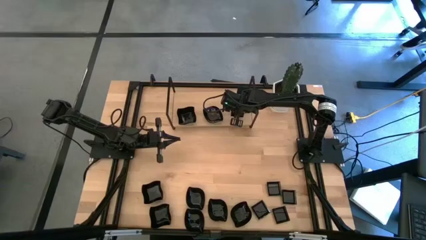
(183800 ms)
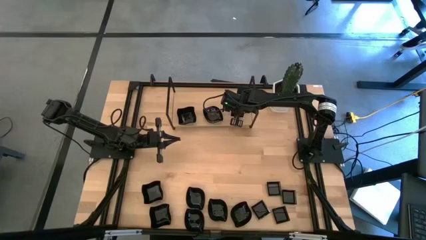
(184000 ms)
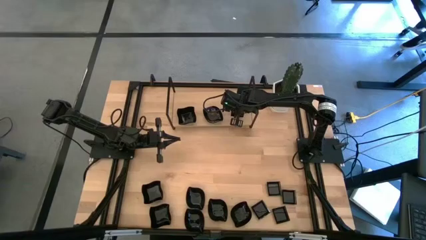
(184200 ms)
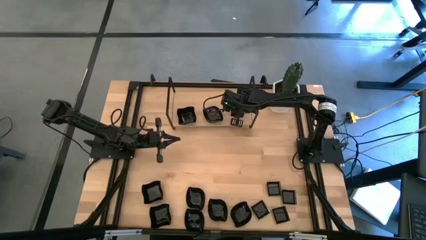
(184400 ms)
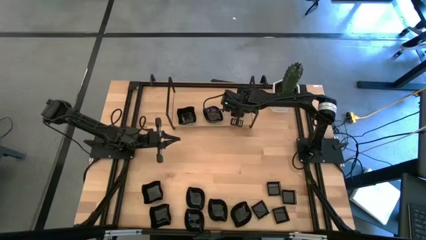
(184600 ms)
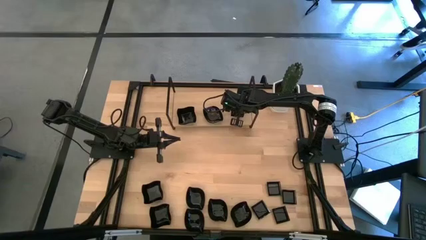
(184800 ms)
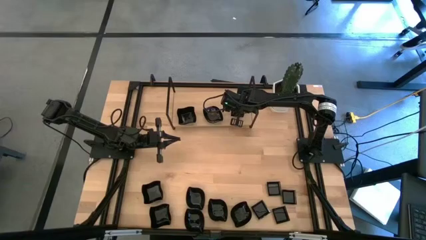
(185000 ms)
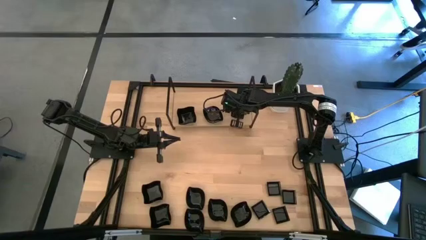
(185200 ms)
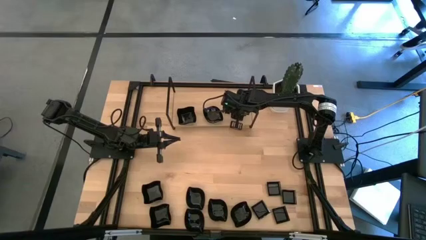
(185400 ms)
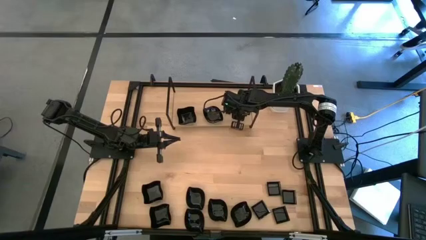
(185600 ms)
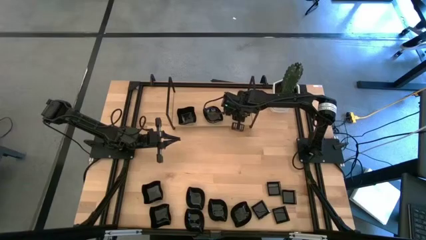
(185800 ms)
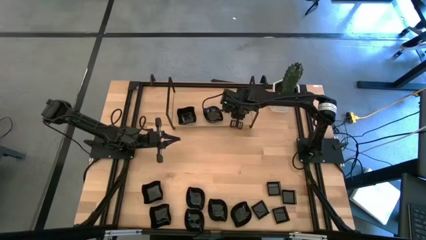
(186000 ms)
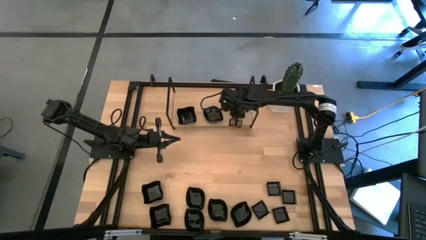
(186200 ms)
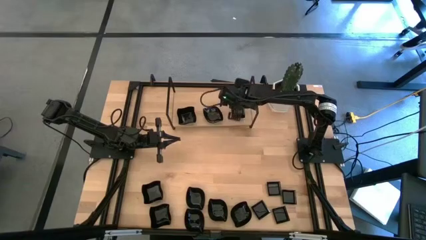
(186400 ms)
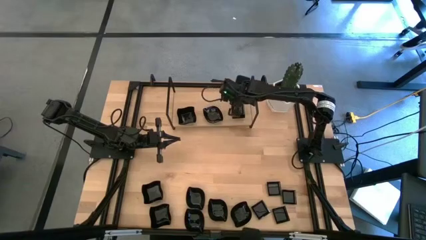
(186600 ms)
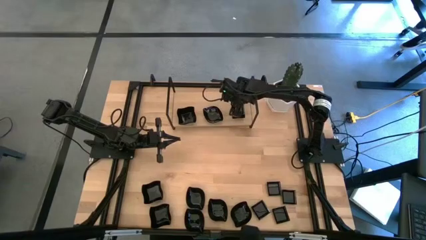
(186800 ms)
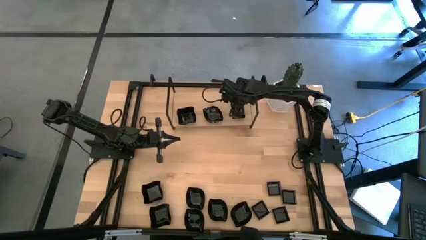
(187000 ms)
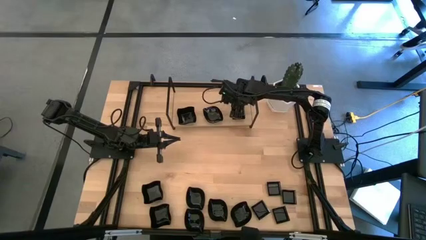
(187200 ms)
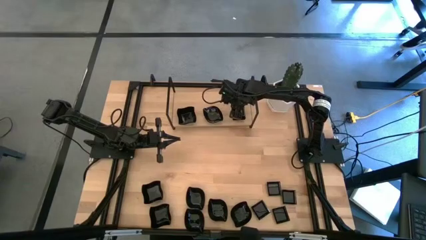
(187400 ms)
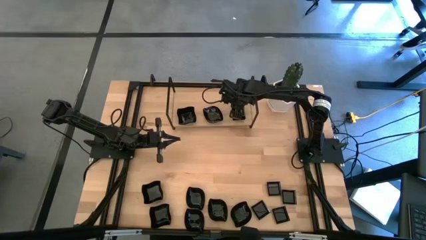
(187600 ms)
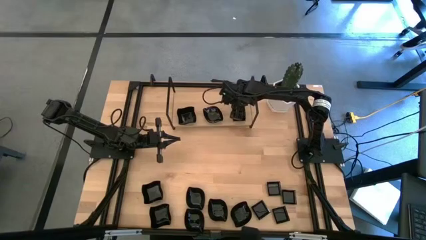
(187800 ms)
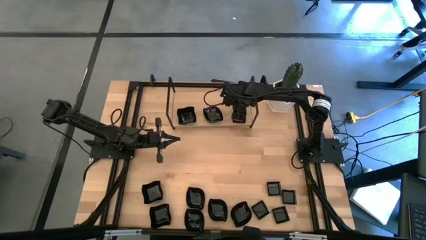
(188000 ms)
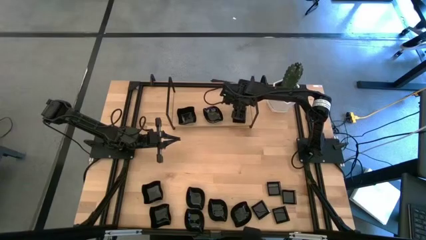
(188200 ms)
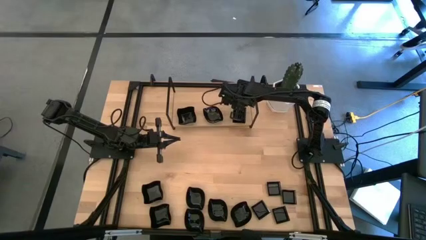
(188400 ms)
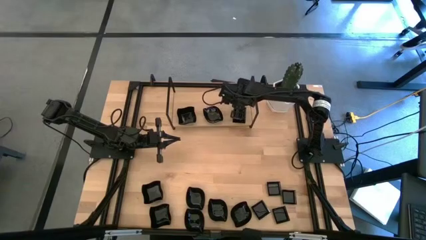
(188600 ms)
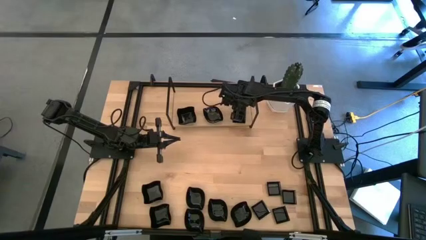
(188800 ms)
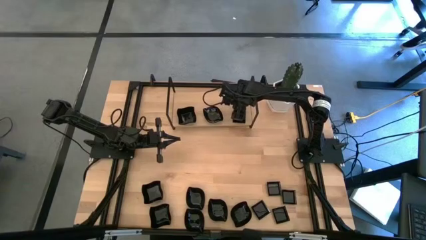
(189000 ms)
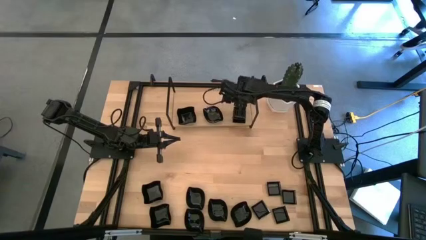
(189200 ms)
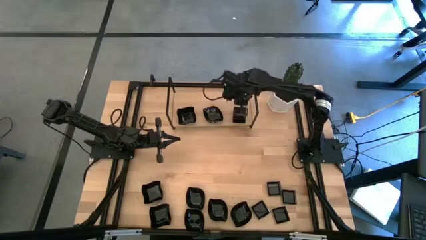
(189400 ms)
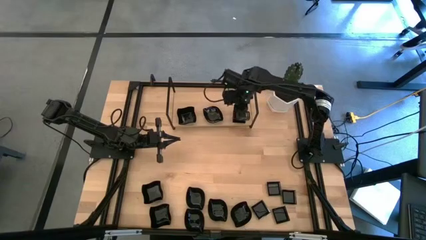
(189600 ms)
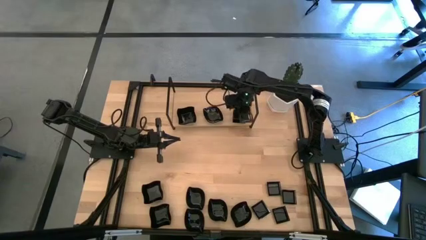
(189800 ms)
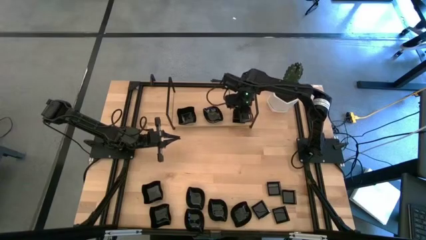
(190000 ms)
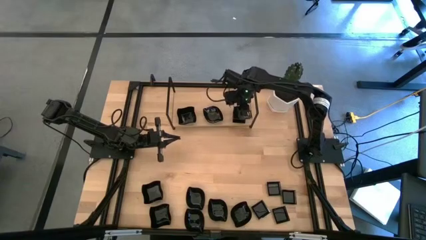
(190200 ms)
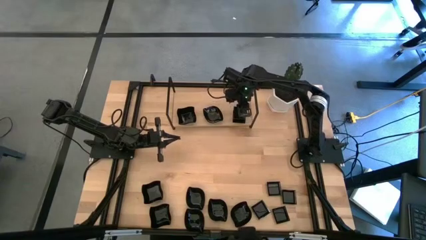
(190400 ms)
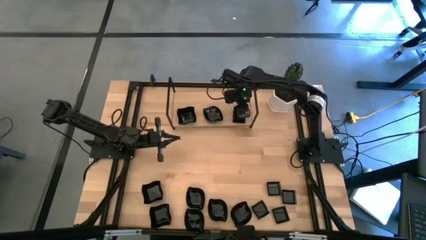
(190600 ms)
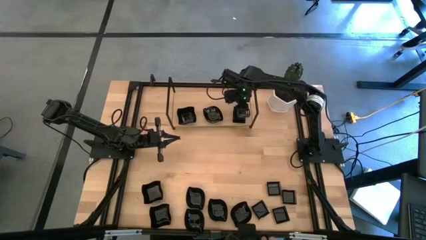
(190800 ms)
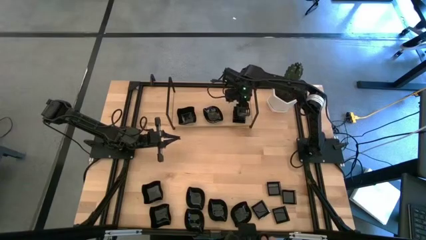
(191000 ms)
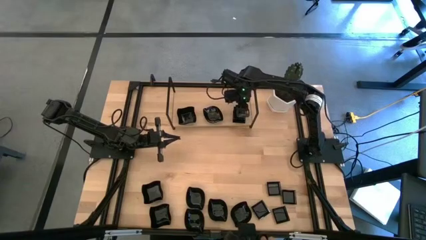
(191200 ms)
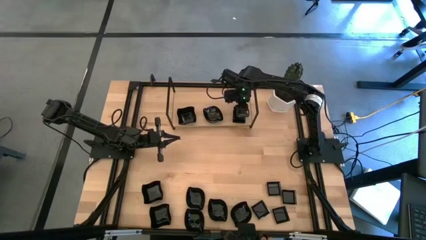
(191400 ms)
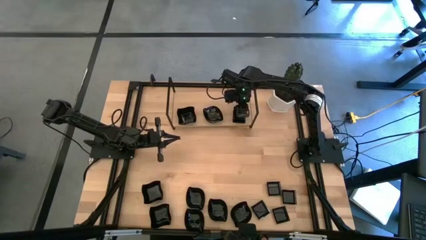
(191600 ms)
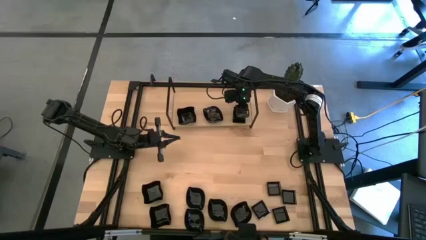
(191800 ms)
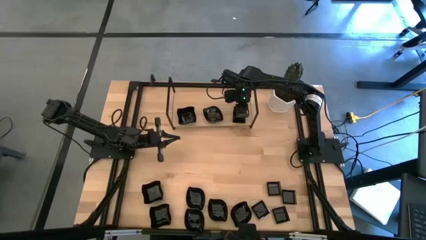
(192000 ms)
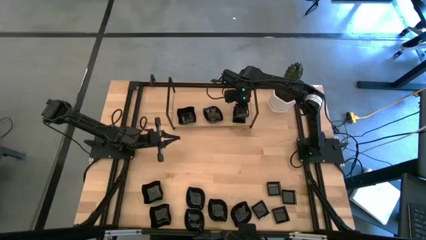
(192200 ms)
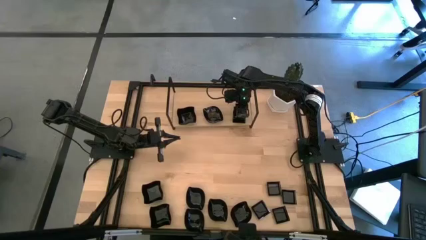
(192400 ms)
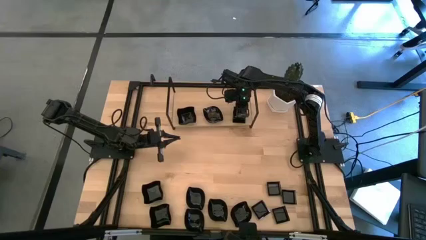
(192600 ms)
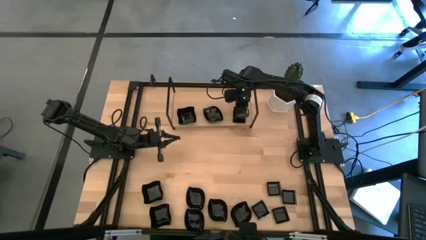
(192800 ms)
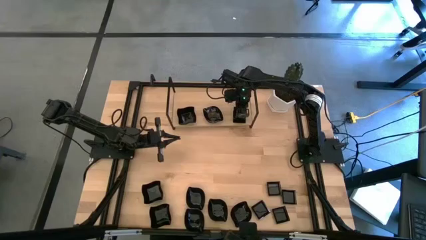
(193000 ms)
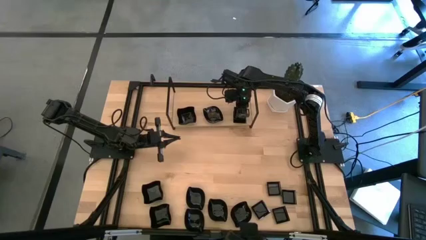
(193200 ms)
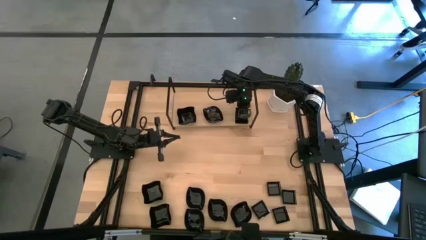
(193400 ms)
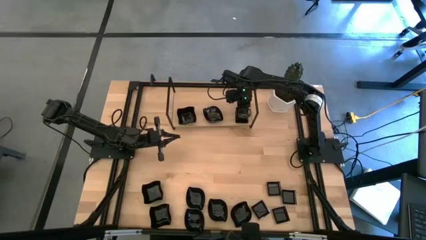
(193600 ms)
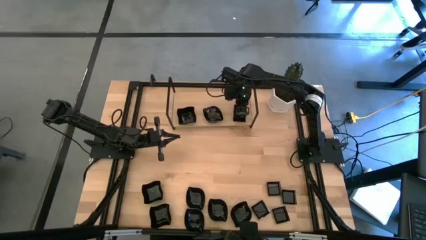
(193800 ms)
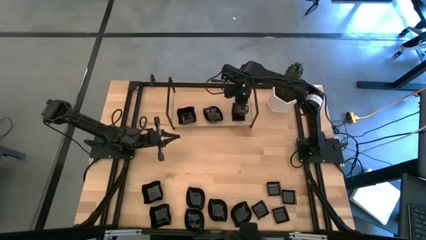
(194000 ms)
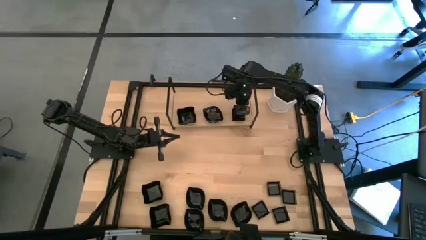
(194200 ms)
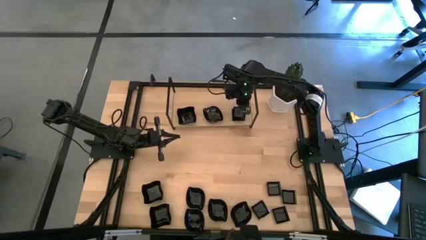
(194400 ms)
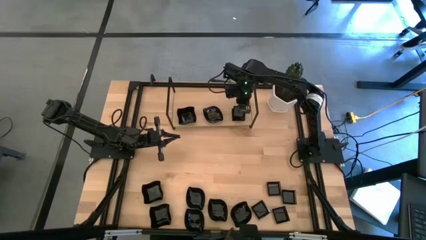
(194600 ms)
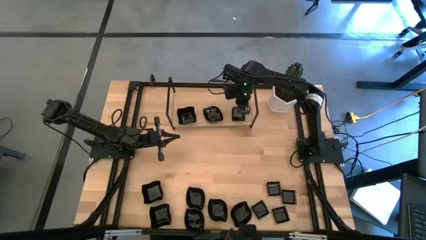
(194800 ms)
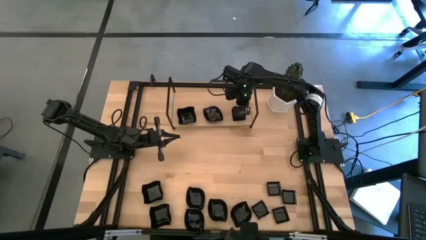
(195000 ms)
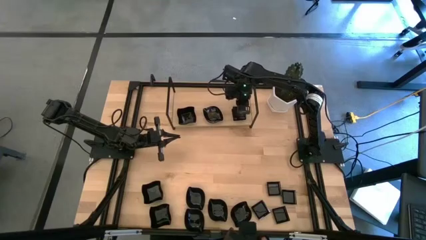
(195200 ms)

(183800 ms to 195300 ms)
Task: Pick & Place Mini shaped plates
Stack the black square plate on top of the black square plate on the shelf

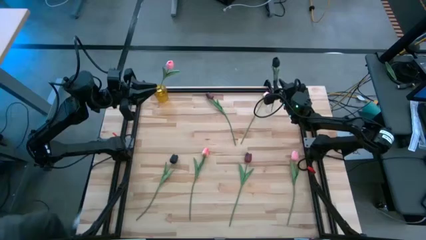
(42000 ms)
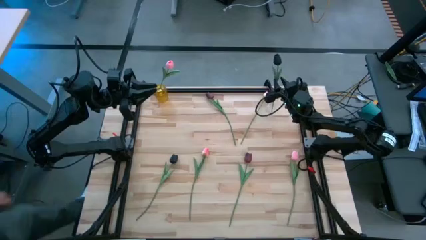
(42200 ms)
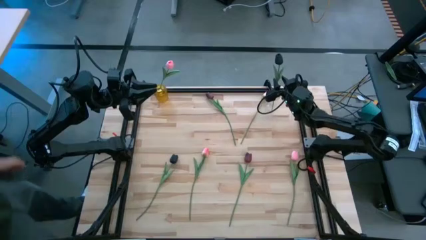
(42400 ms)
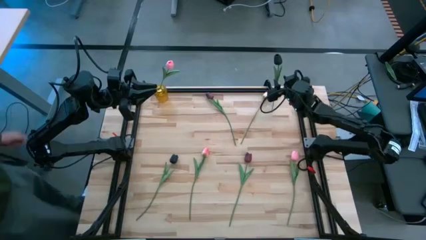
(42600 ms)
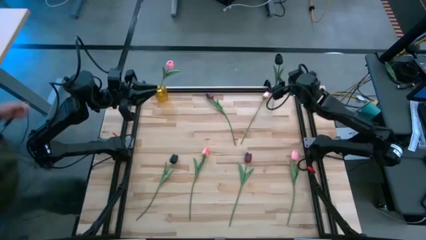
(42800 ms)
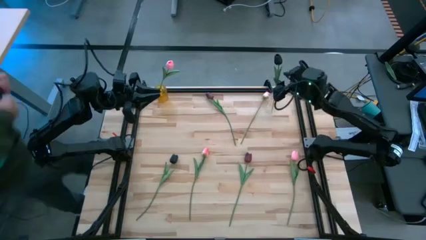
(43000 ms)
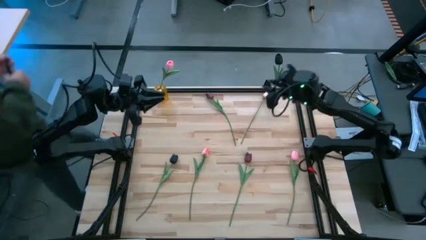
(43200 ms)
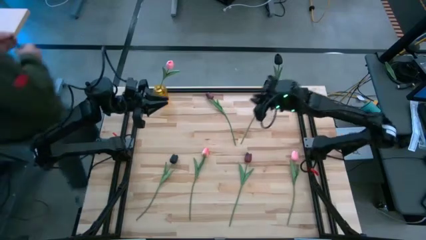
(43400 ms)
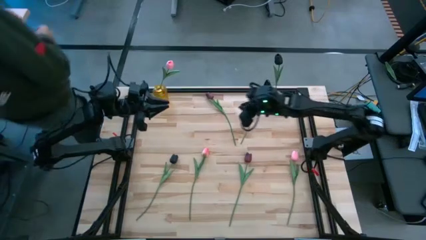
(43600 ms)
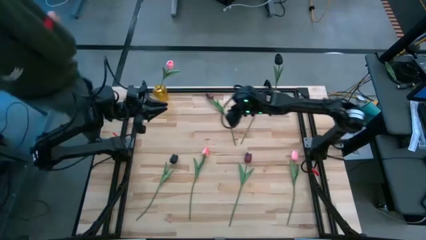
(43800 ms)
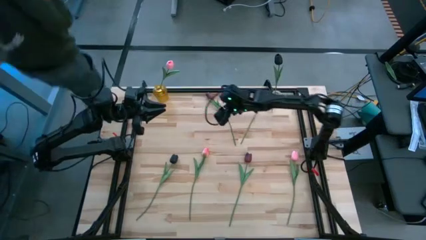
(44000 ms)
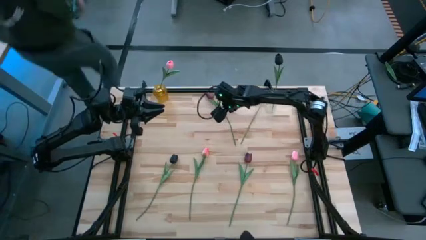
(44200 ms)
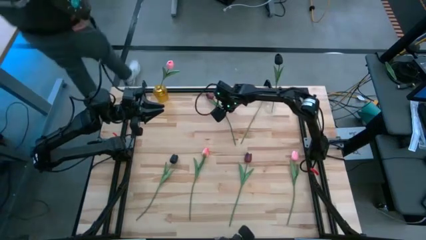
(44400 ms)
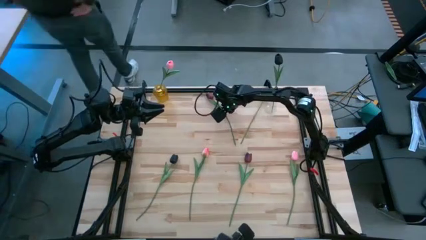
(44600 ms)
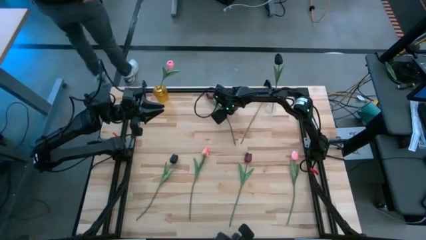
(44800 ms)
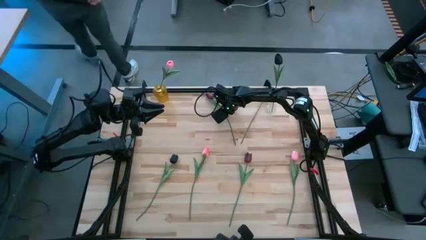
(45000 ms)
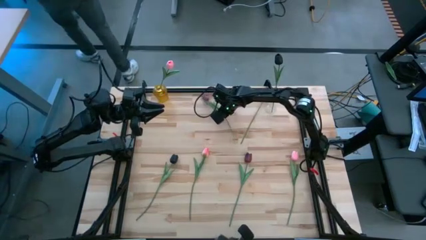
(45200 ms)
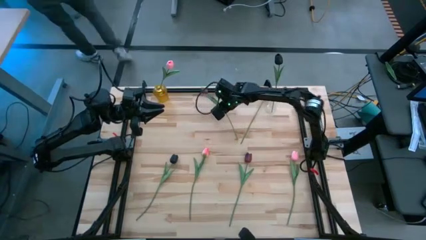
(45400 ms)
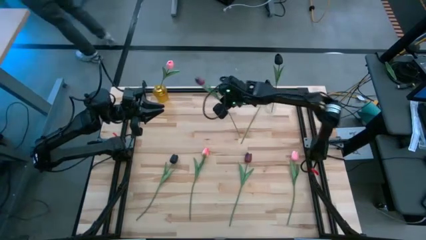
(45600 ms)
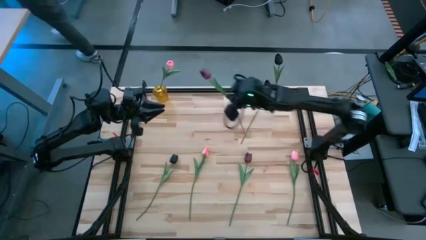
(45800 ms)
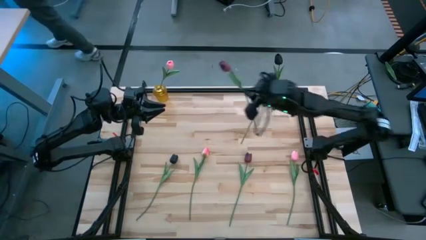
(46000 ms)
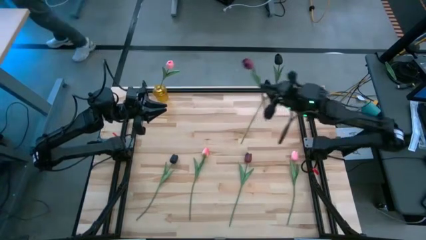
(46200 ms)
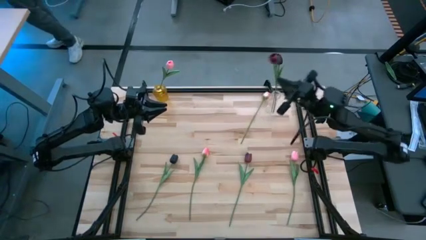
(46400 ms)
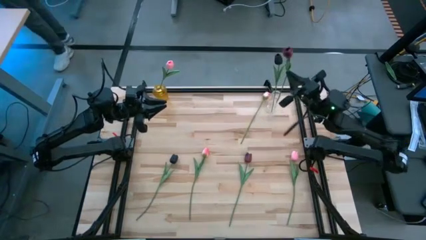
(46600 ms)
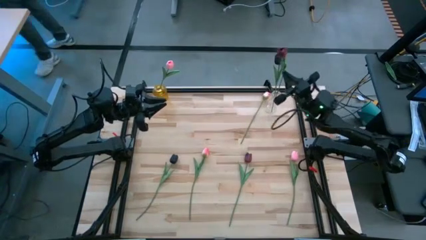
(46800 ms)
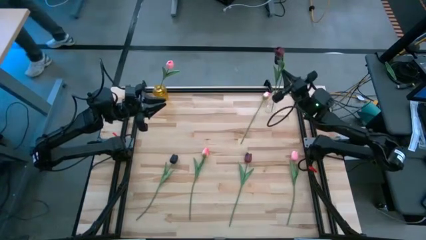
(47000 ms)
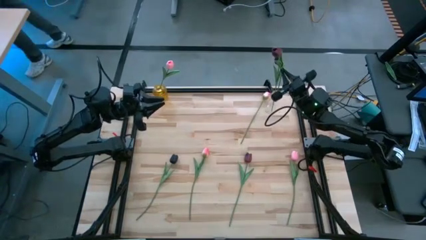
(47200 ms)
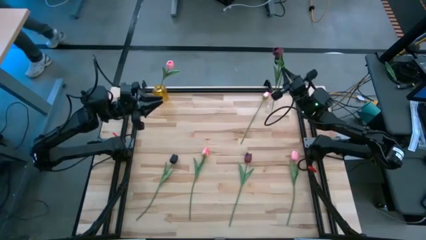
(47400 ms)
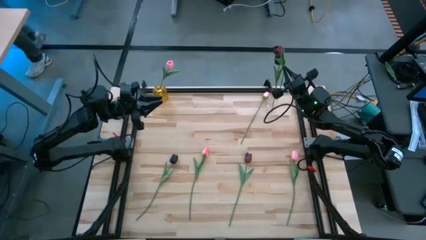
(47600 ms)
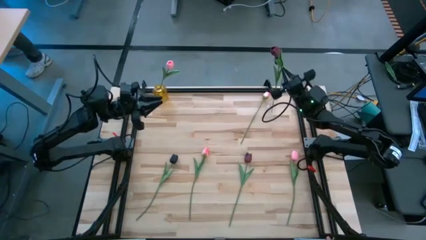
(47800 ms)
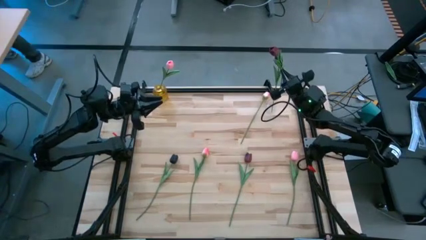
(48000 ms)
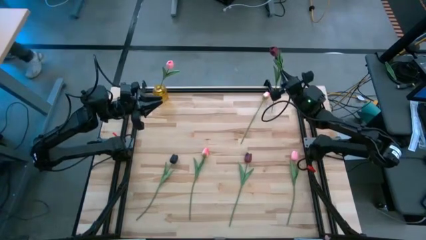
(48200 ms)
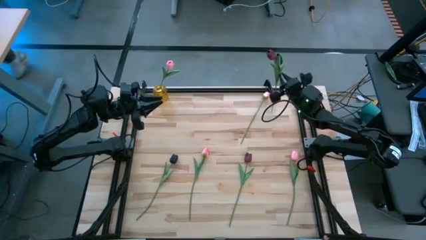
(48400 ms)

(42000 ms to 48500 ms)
Task: Sort flowers into vase by color
Insert the top dark red tulip into the transparent vase
